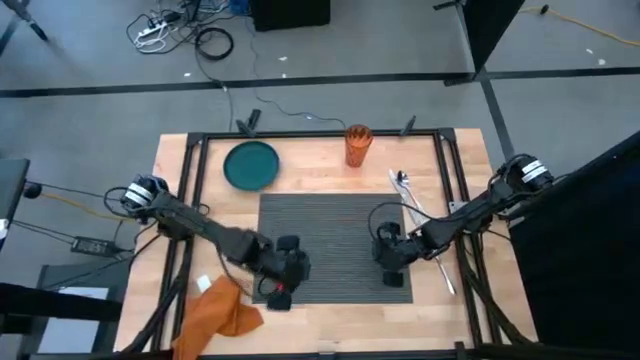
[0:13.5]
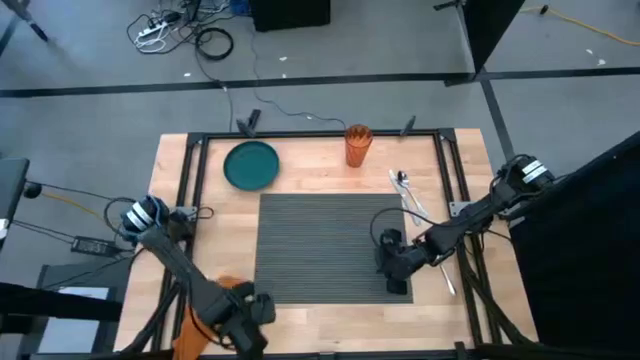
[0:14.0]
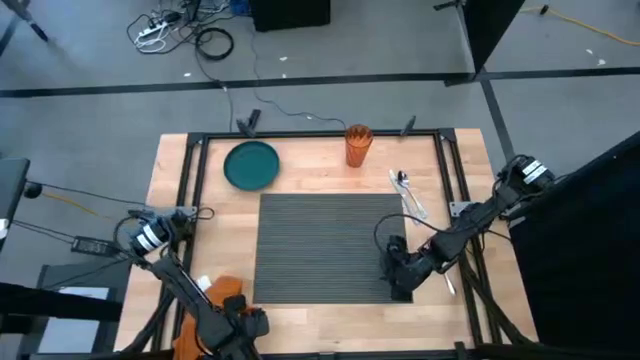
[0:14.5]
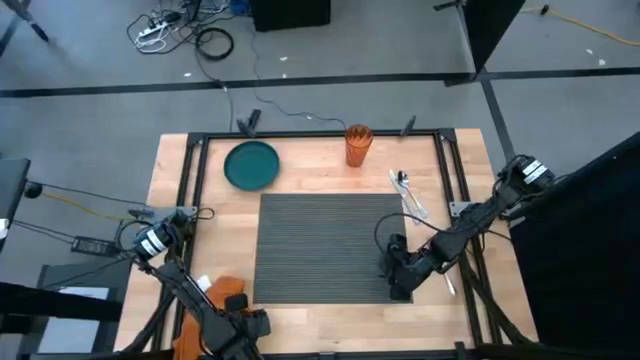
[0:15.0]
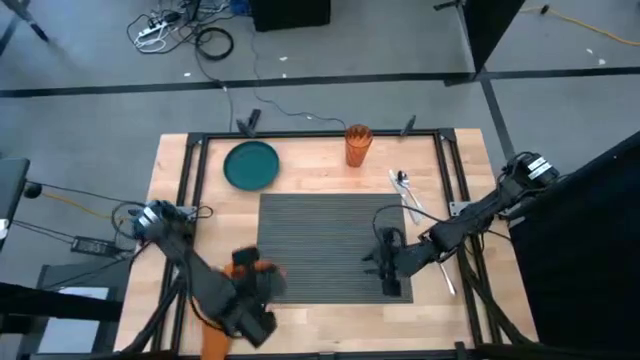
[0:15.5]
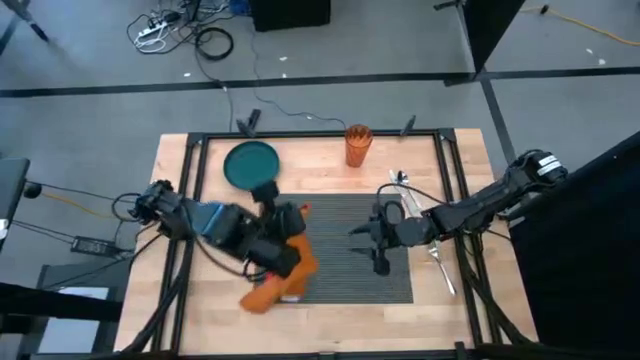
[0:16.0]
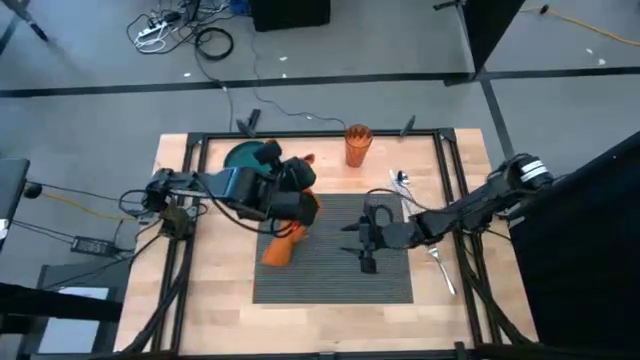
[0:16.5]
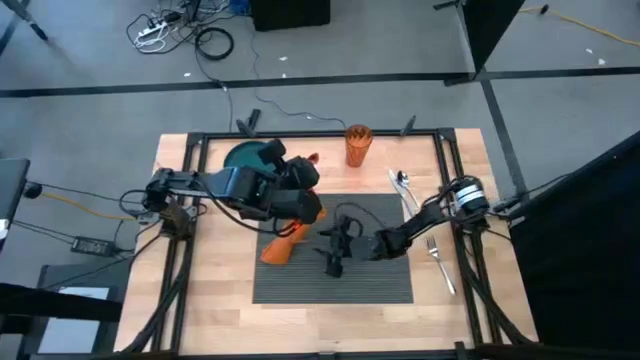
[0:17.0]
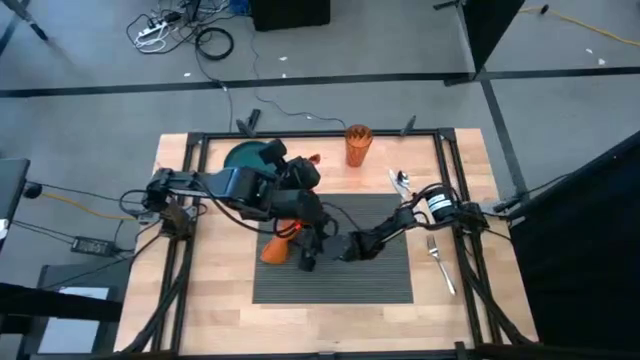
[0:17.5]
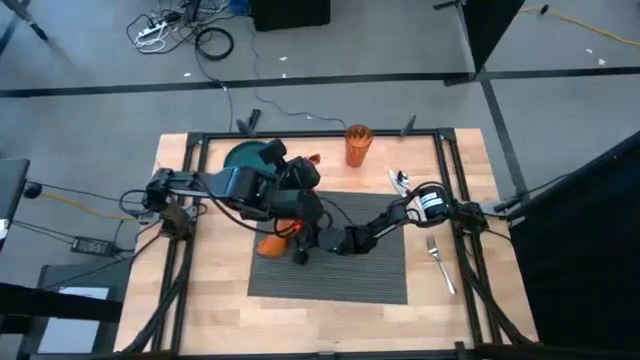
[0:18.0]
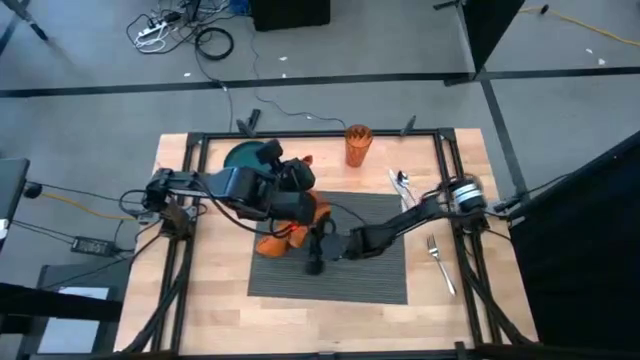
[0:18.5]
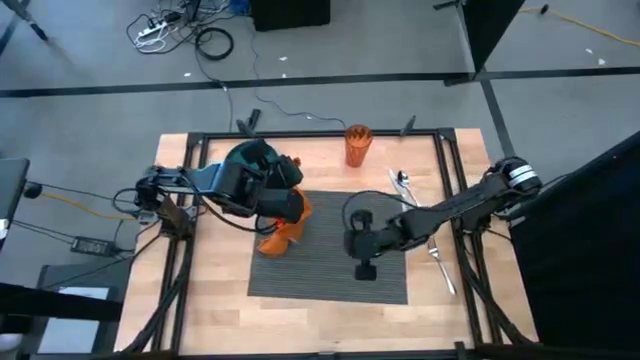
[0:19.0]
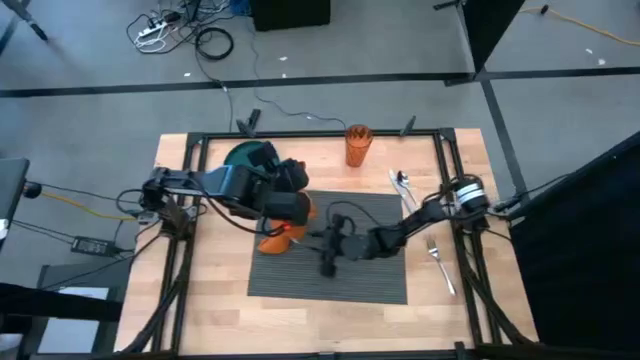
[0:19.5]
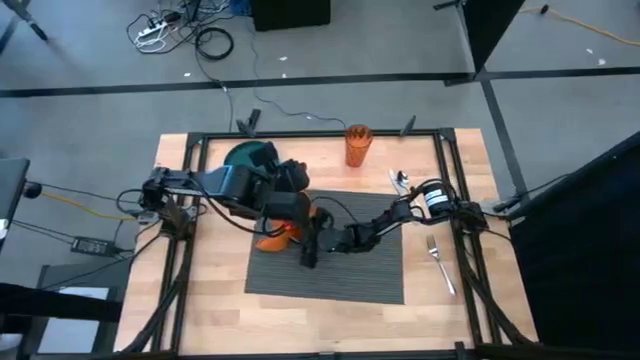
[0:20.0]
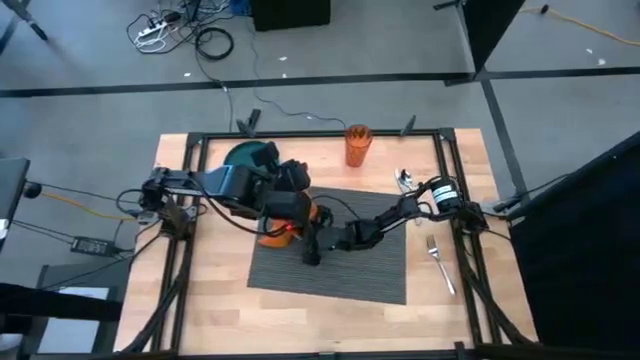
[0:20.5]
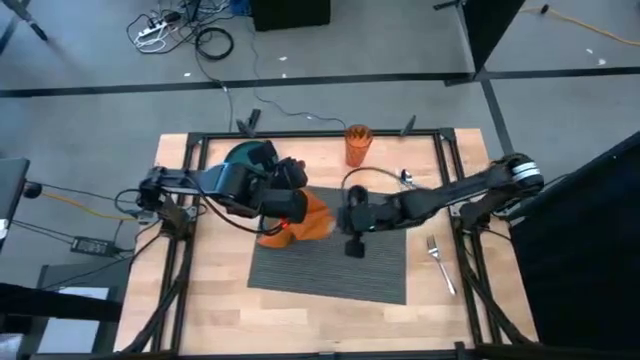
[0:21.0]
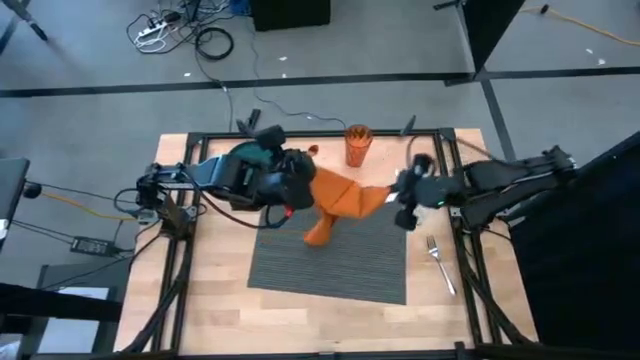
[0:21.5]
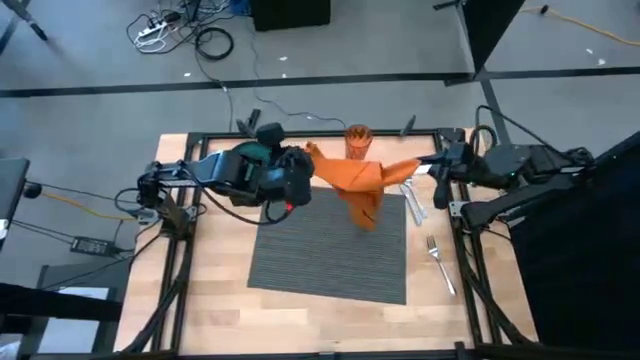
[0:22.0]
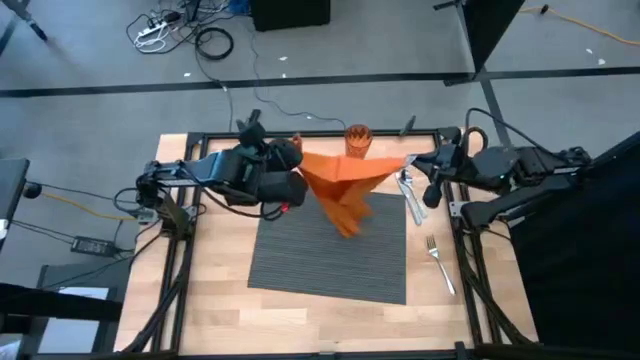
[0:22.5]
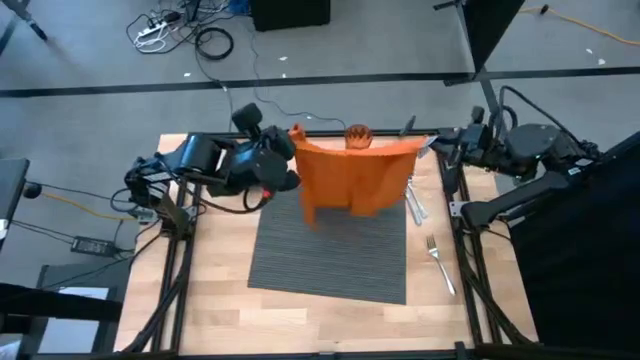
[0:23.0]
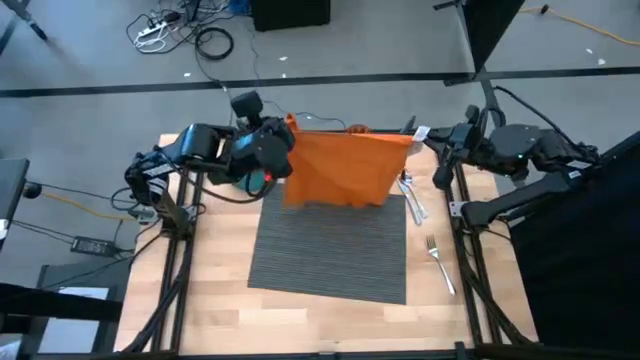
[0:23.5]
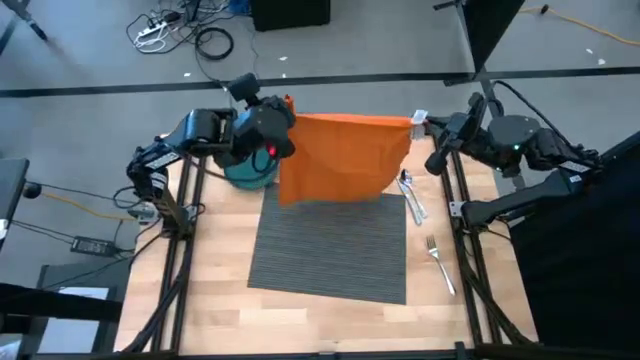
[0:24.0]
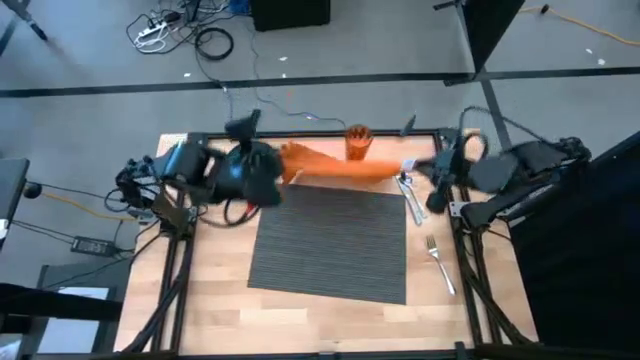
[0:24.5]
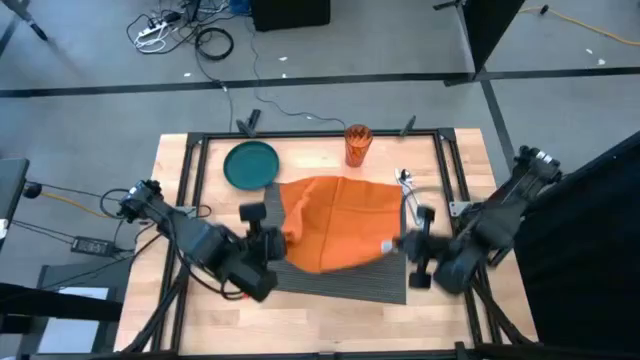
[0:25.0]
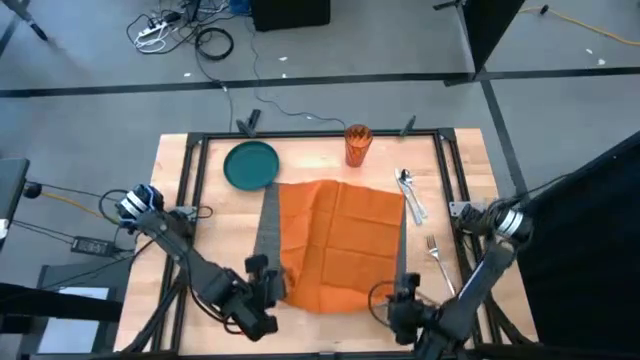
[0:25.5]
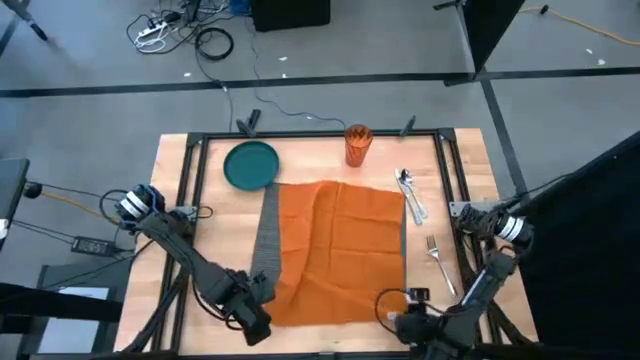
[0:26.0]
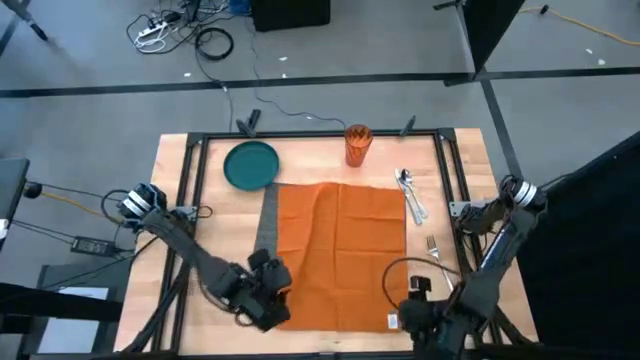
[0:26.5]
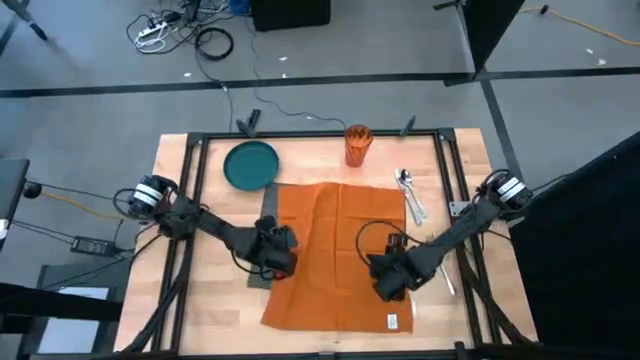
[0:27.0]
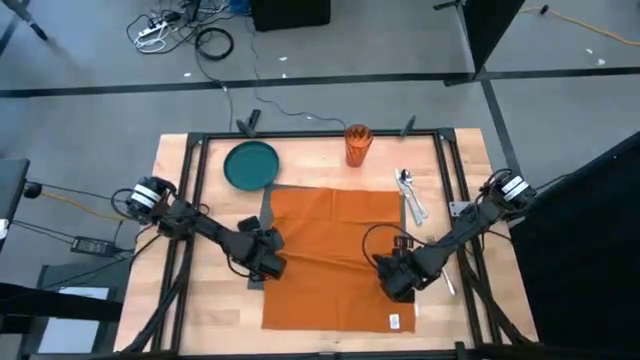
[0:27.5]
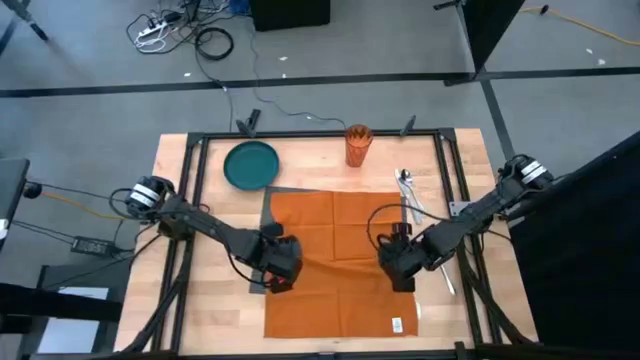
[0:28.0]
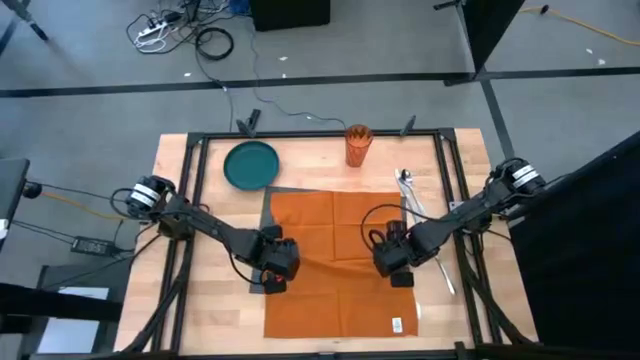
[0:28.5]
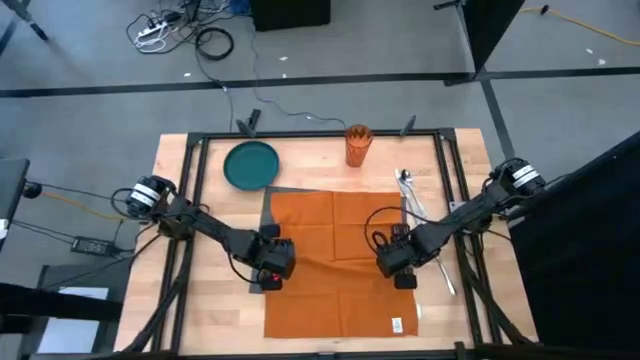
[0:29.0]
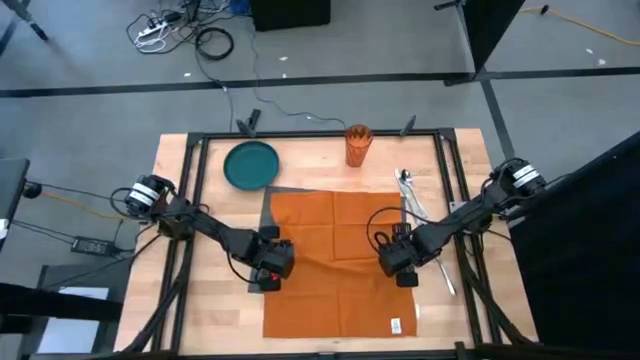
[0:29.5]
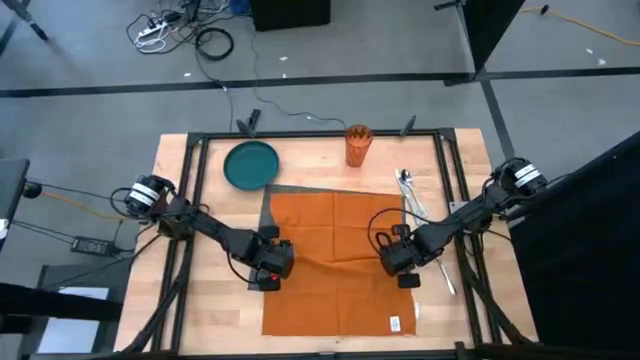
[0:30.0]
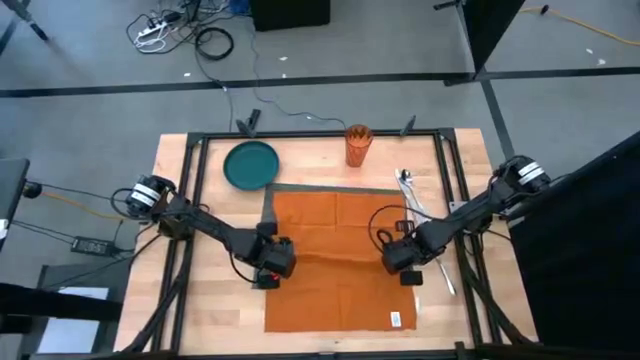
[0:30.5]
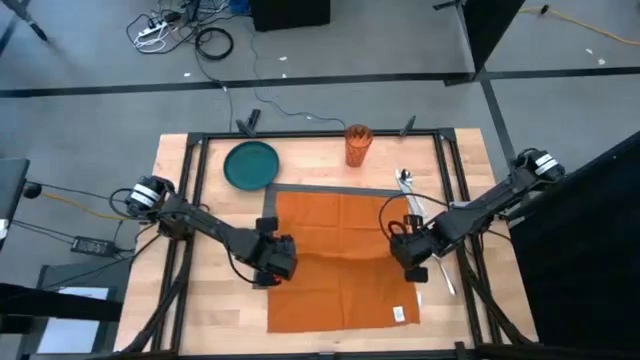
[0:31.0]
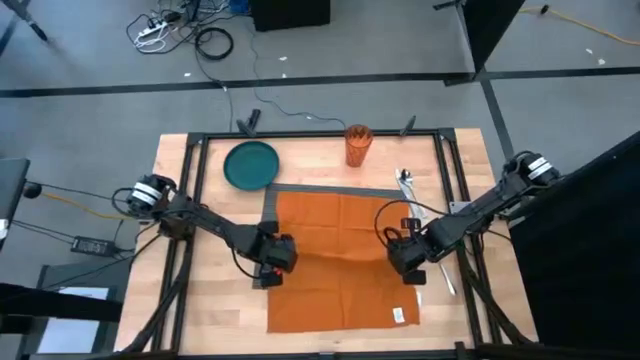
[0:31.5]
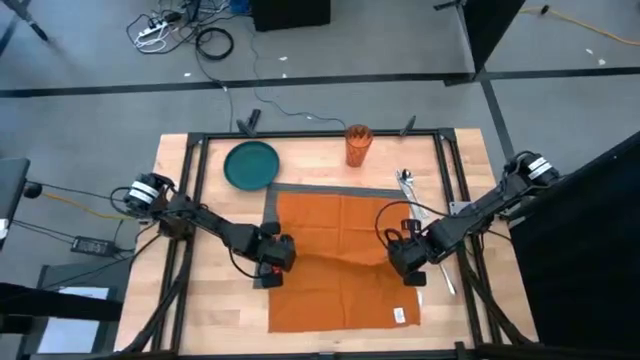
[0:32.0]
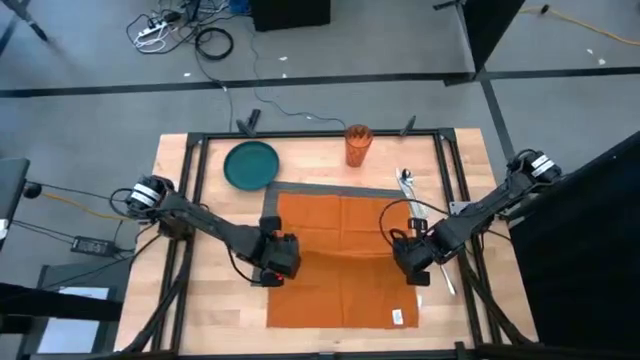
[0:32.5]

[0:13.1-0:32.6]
Task: Set table place
Fold the orange table napkin
